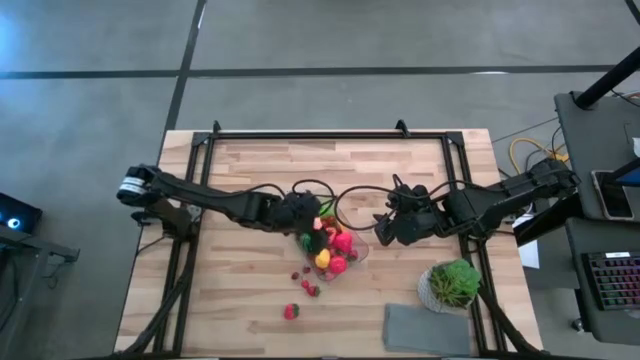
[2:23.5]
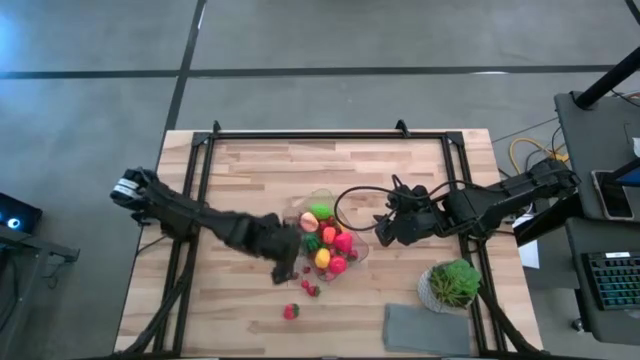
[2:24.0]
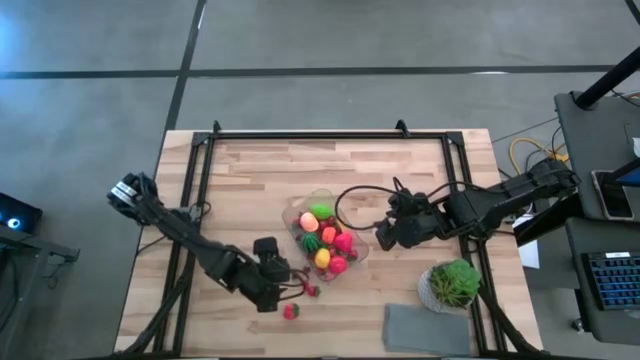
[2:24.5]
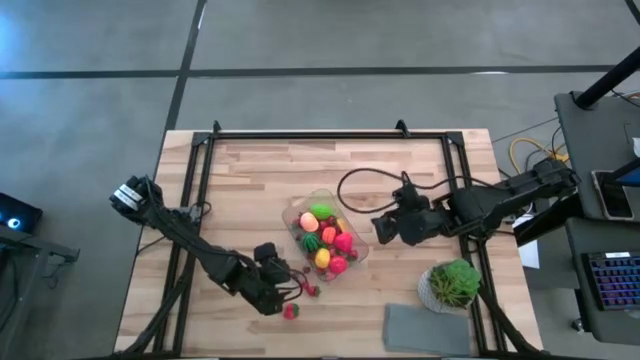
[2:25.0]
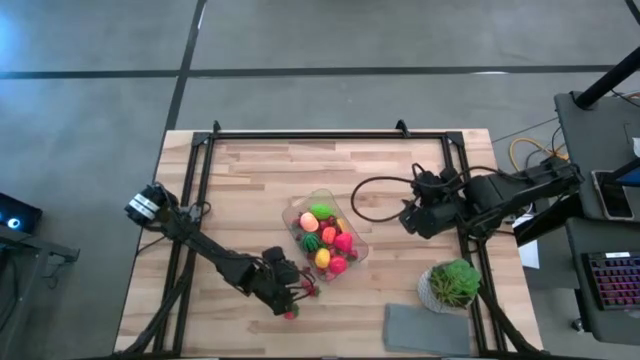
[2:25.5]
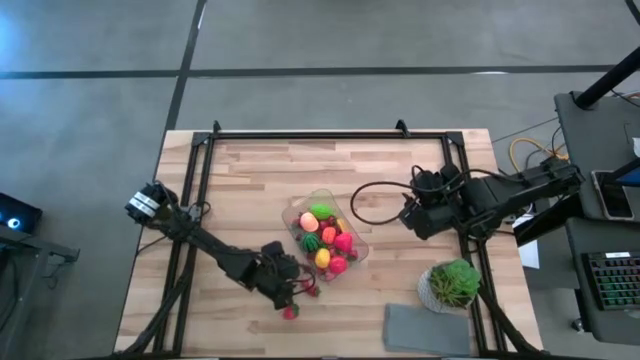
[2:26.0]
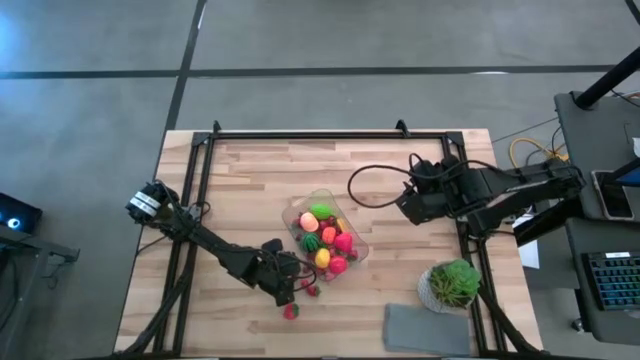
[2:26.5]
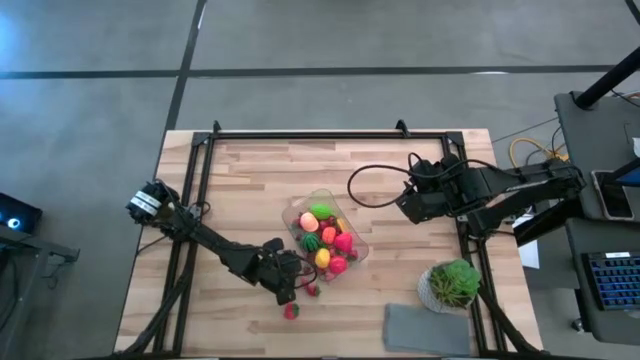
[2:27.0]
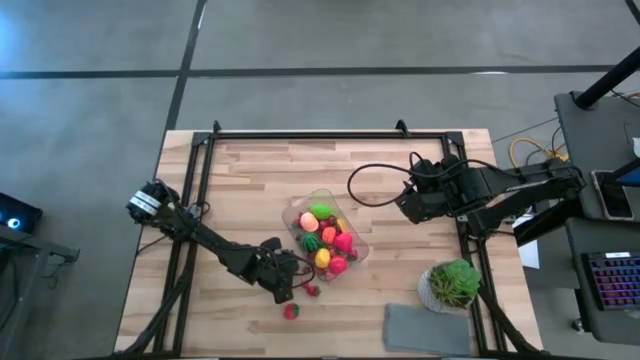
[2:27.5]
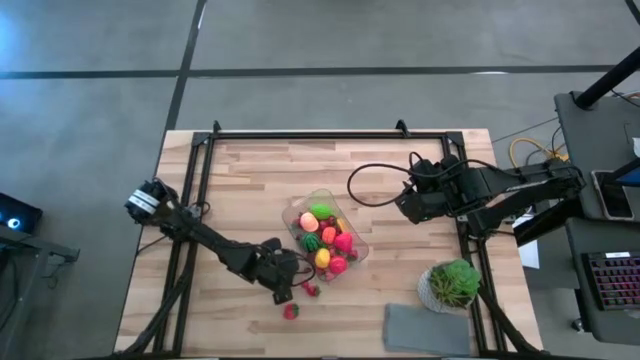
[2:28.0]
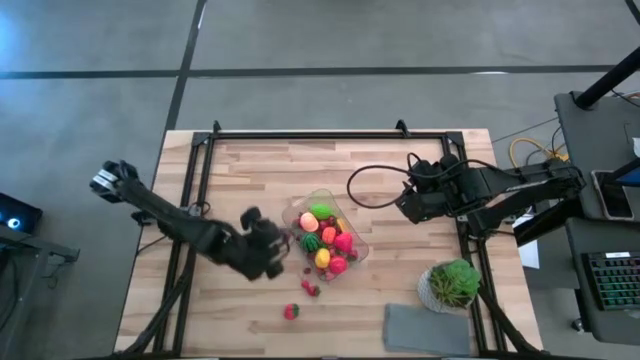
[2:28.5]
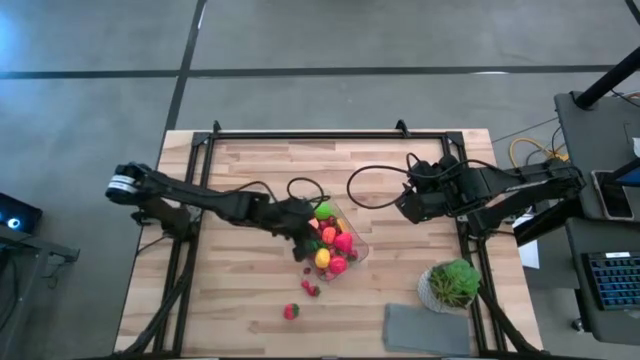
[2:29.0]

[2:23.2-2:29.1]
Task: Pick and placing Produce into tupperware
Put the red cherry into the transparent bin

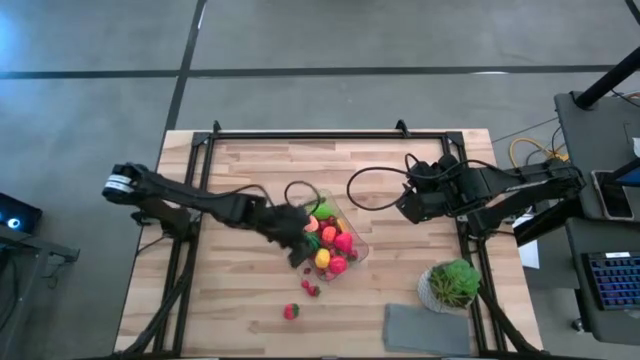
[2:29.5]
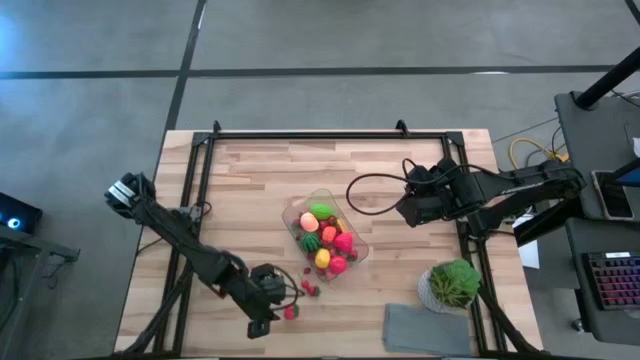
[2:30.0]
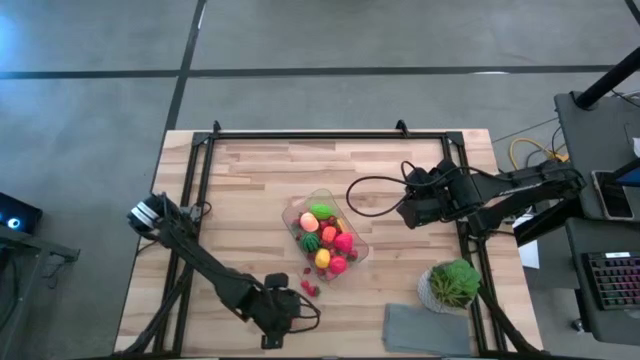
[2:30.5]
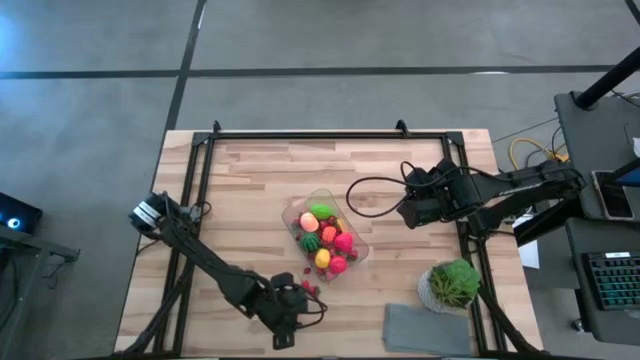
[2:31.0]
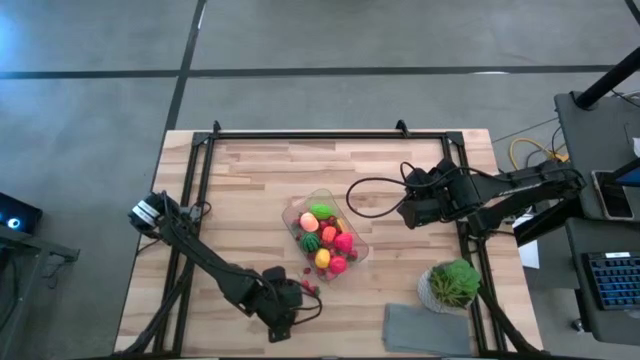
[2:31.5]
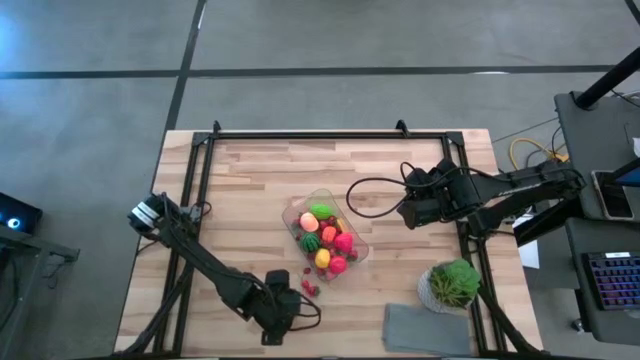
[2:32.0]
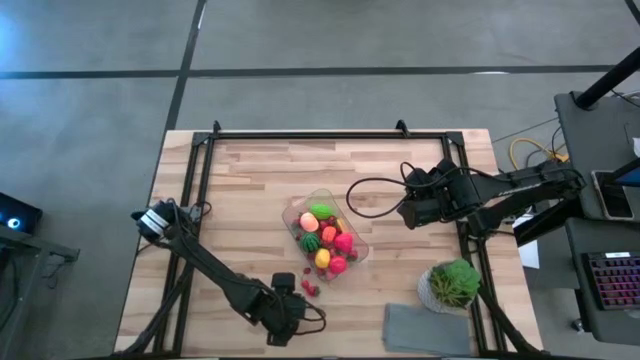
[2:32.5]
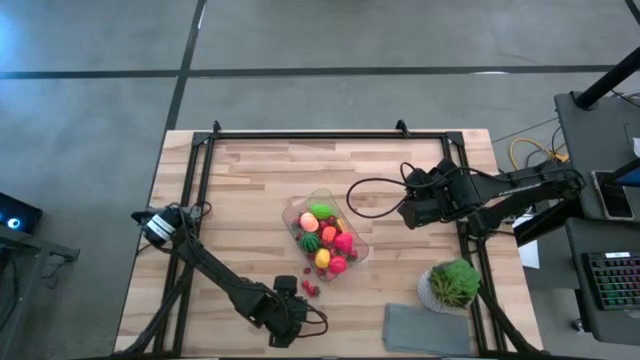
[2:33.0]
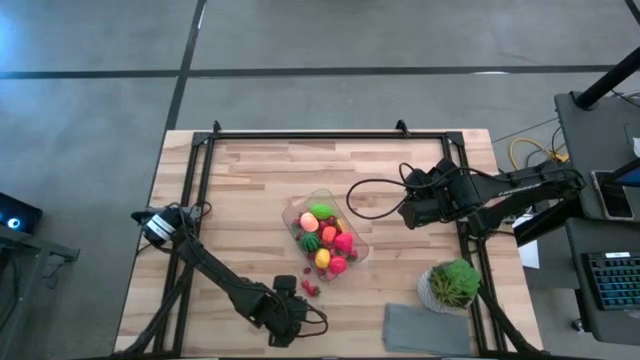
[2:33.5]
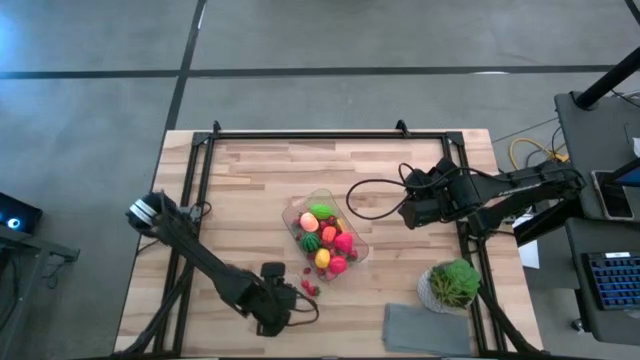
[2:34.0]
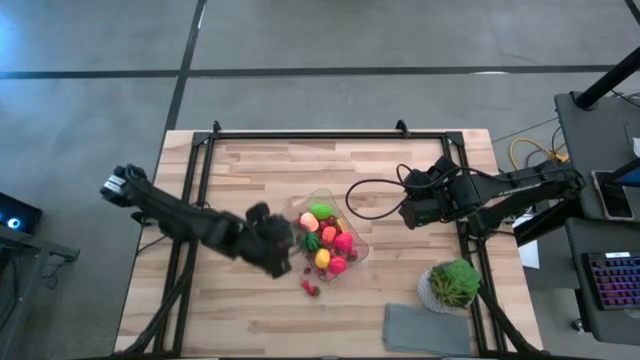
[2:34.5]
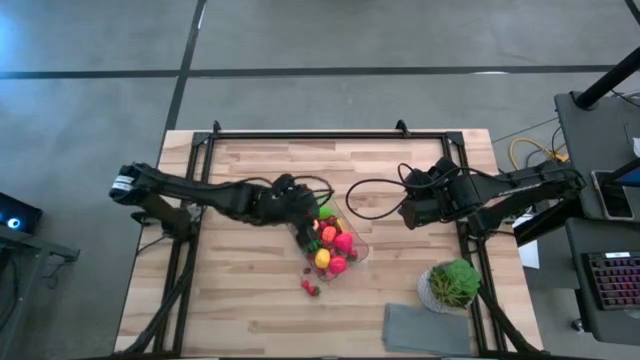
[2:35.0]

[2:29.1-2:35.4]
Put the red strawberry into the transparent bin

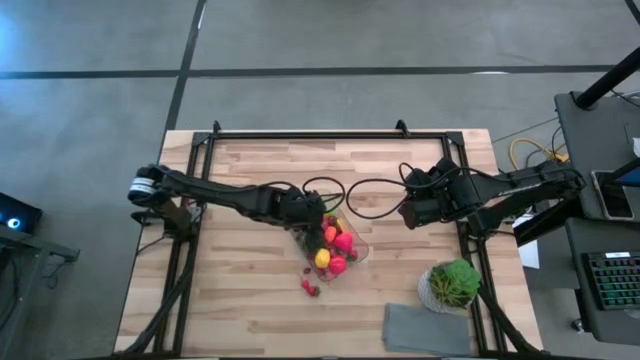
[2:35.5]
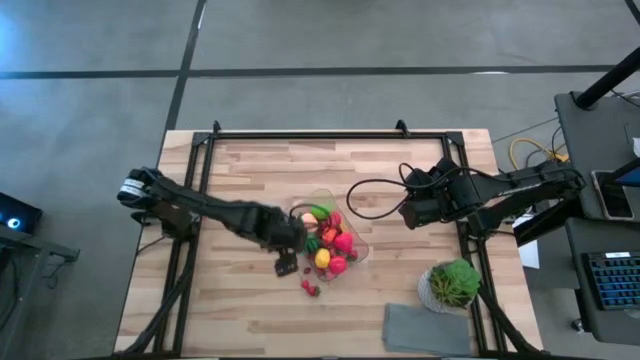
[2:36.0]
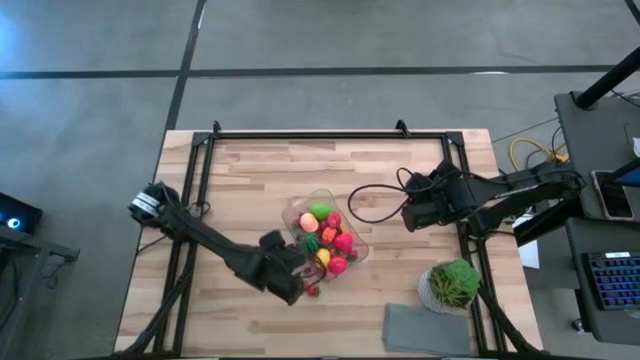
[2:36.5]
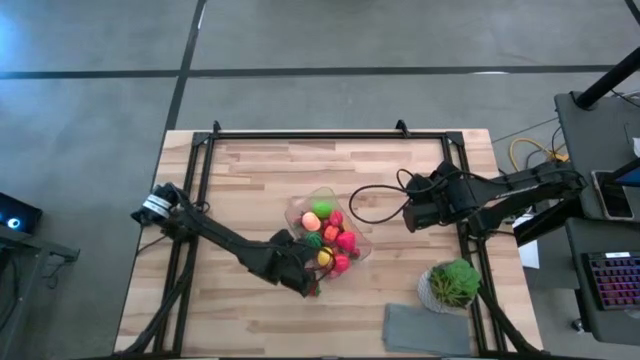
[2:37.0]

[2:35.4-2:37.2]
Adjust the transparent bin

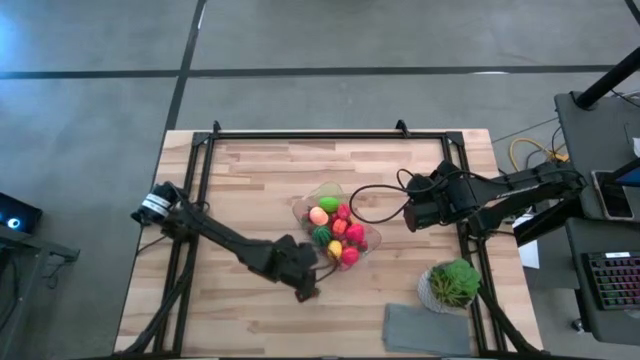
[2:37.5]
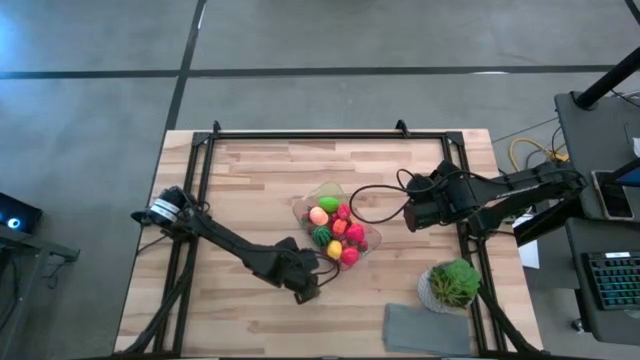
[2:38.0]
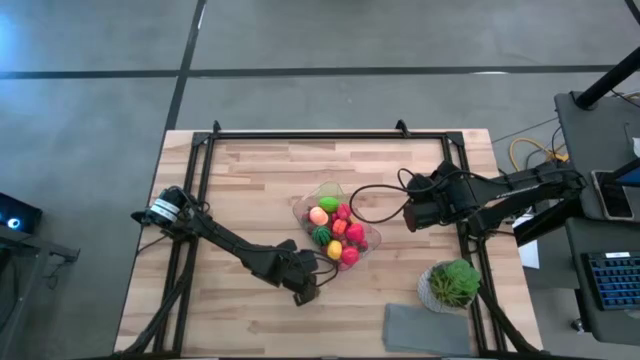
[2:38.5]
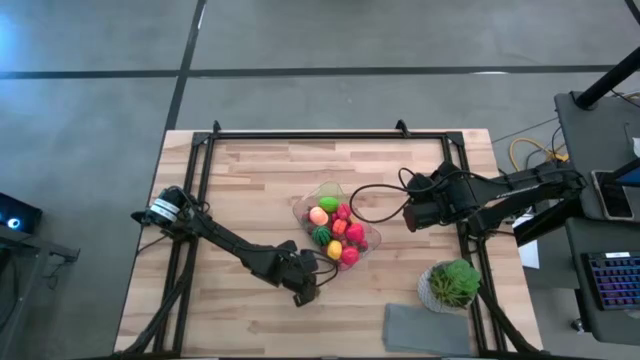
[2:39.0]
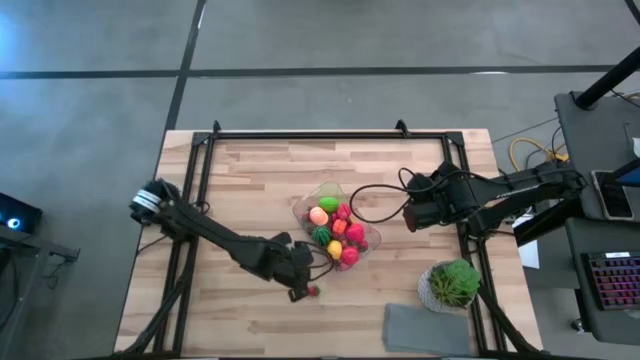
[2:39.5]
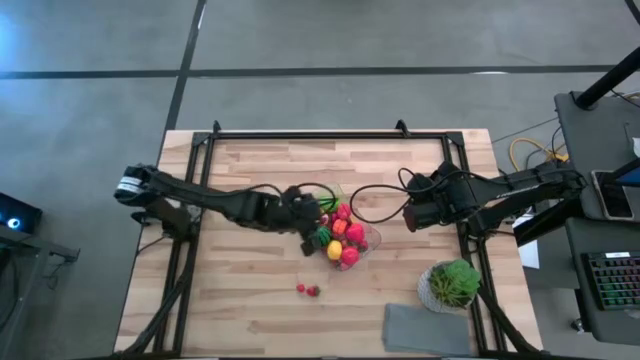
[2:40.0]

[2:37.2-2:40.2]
Put the red cherry into the transparent bin

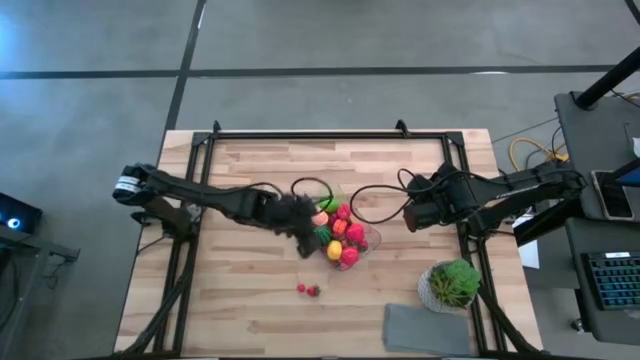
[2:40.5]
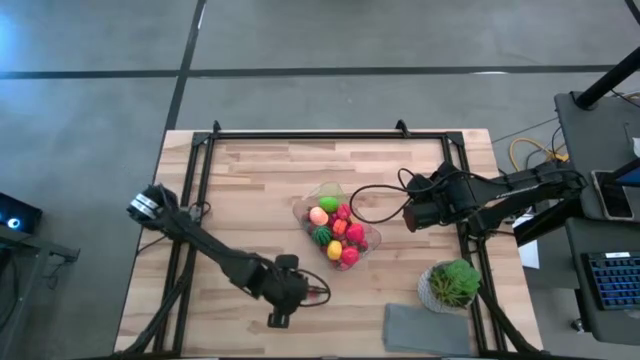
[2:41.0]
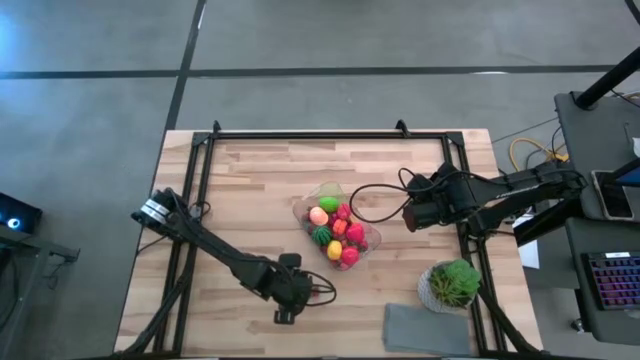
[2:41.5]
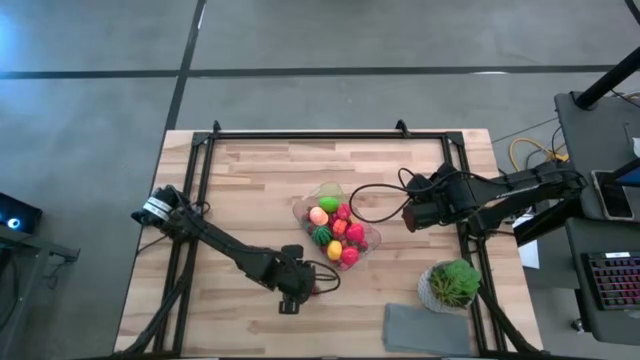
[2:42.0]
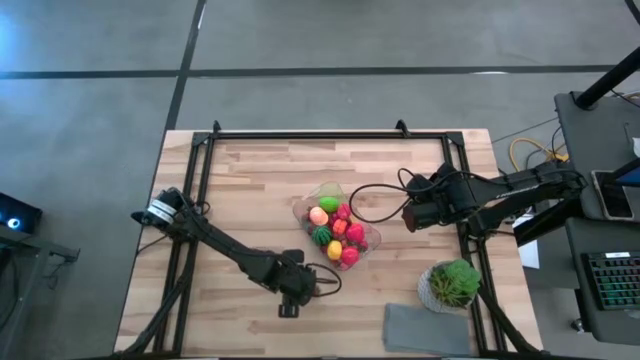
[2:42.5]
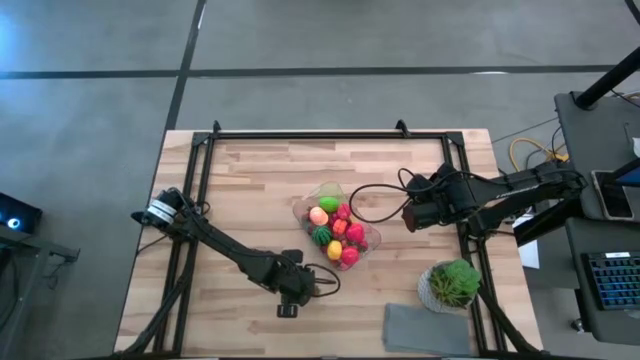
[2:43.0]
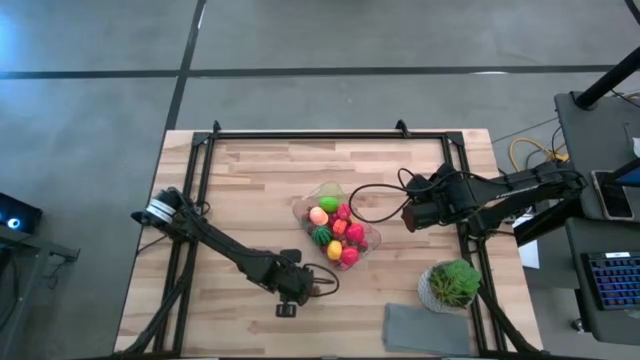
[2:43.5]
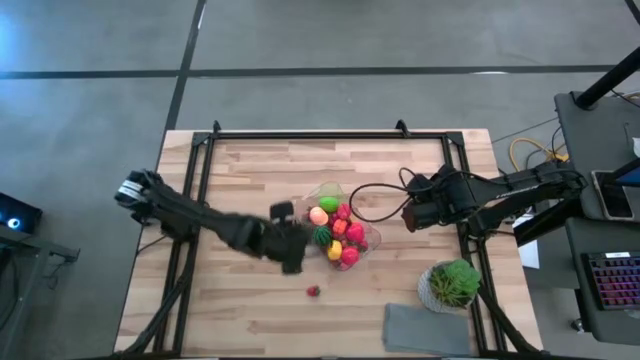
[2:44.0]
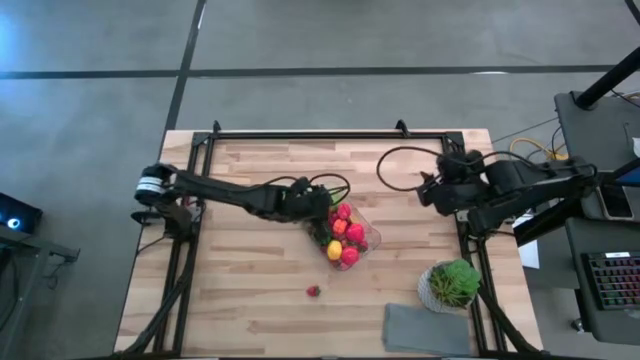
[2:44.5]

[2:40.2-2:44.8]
Put the red cherry into the transparent bin
